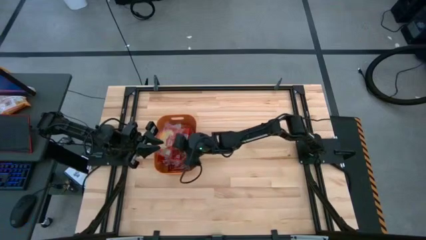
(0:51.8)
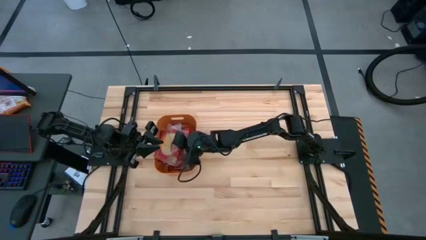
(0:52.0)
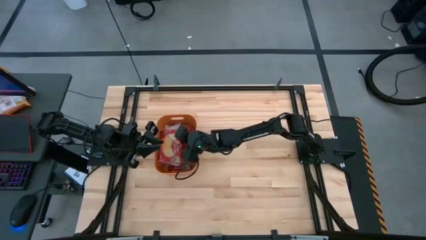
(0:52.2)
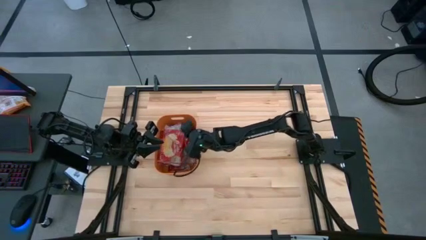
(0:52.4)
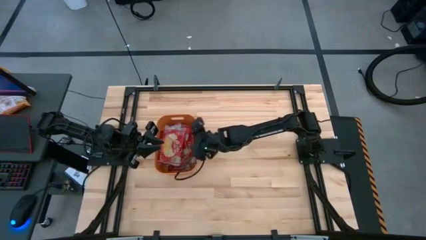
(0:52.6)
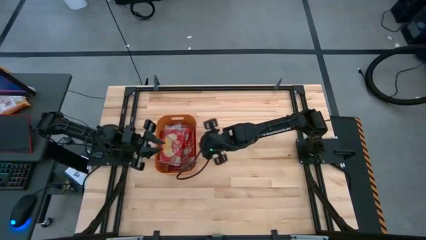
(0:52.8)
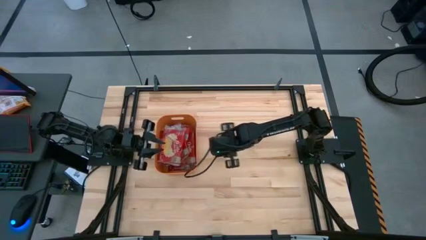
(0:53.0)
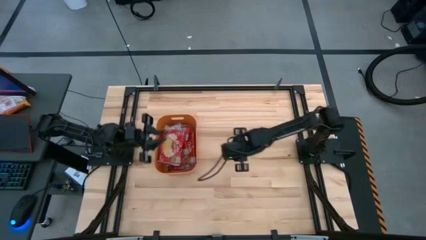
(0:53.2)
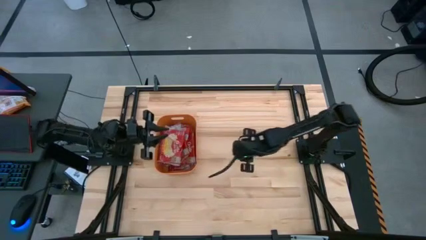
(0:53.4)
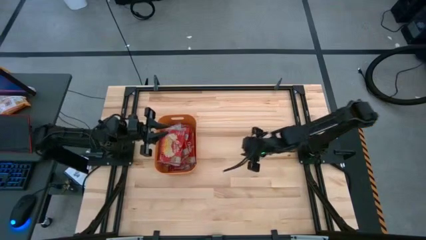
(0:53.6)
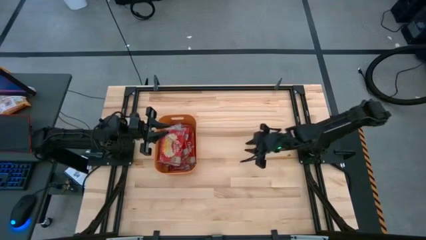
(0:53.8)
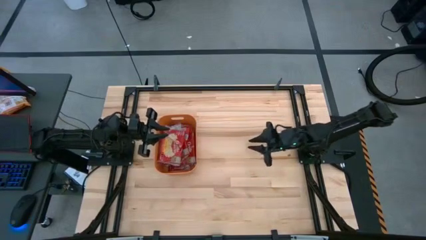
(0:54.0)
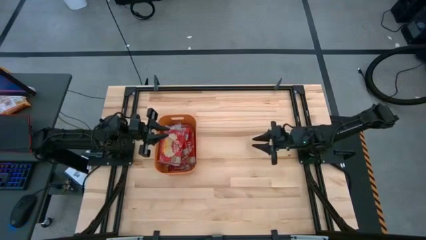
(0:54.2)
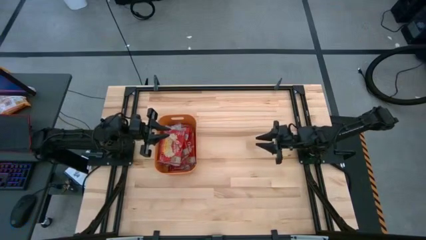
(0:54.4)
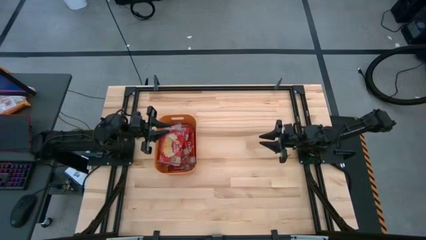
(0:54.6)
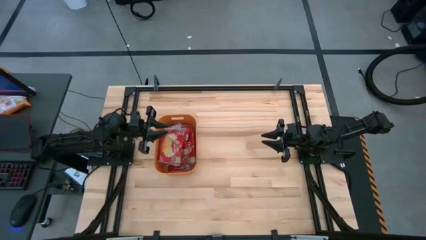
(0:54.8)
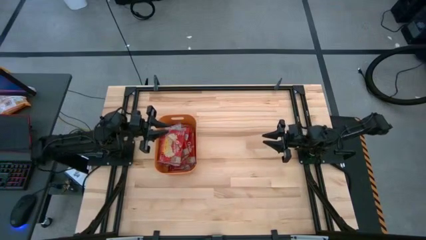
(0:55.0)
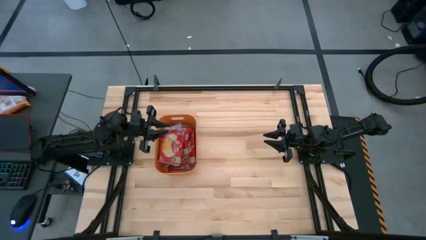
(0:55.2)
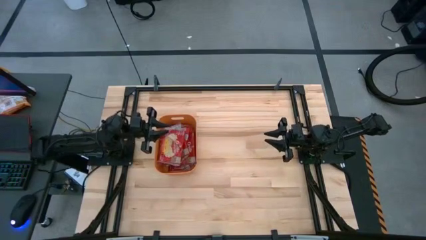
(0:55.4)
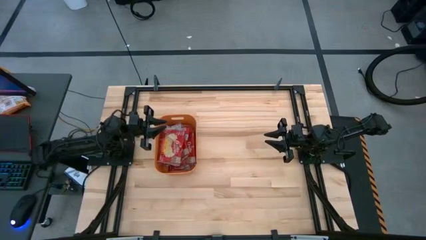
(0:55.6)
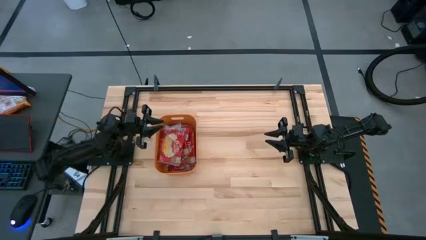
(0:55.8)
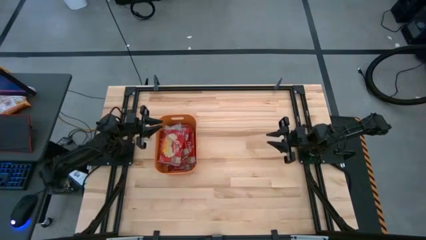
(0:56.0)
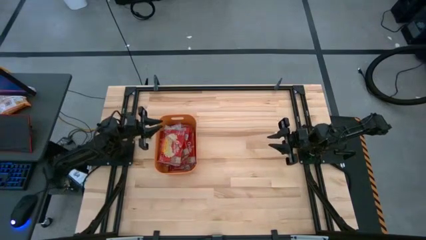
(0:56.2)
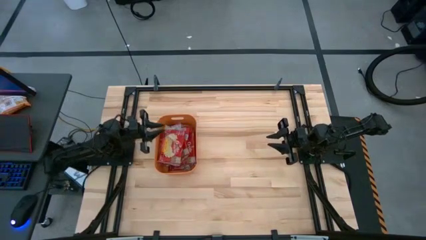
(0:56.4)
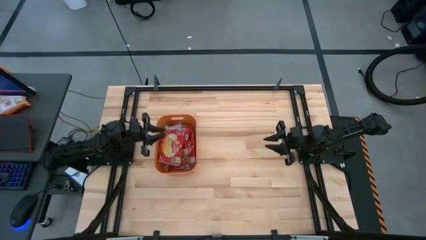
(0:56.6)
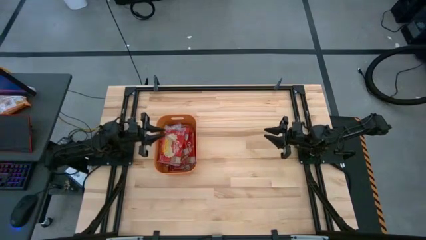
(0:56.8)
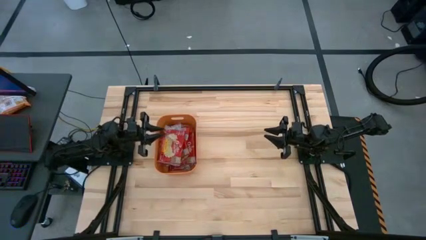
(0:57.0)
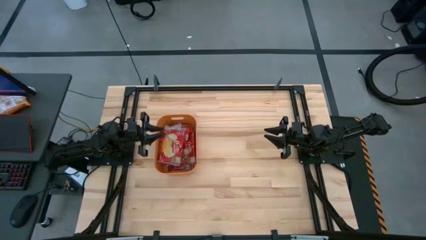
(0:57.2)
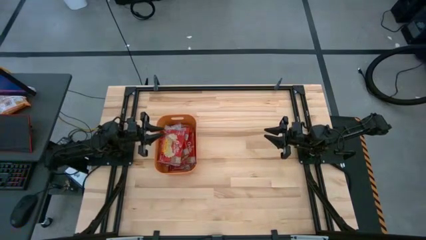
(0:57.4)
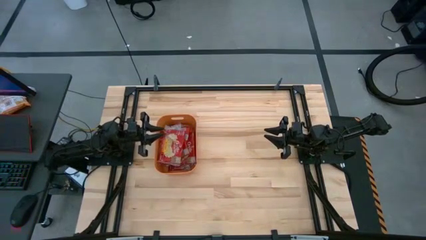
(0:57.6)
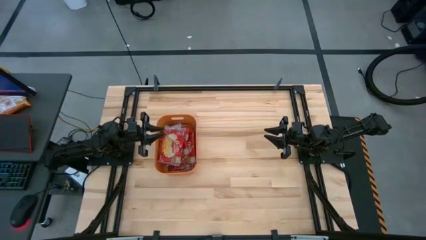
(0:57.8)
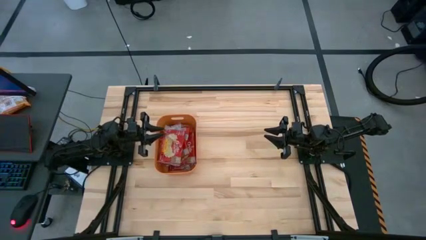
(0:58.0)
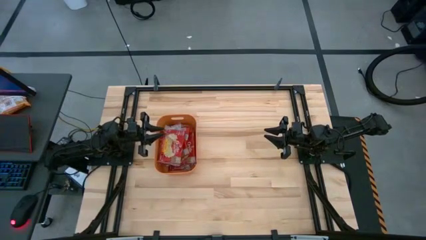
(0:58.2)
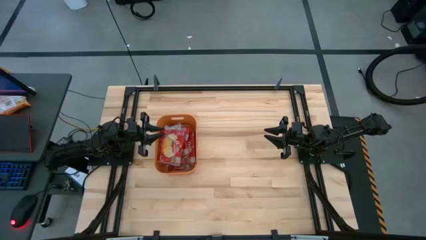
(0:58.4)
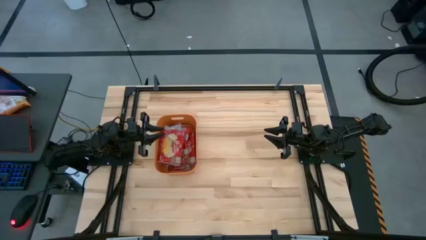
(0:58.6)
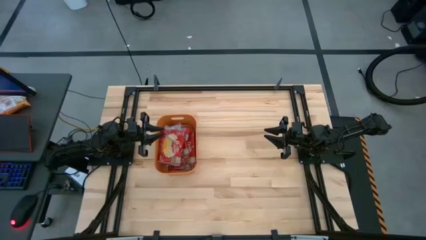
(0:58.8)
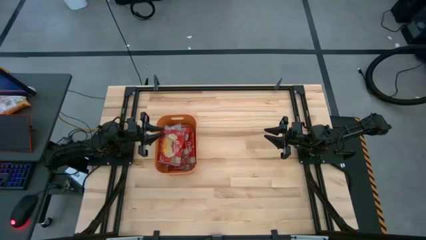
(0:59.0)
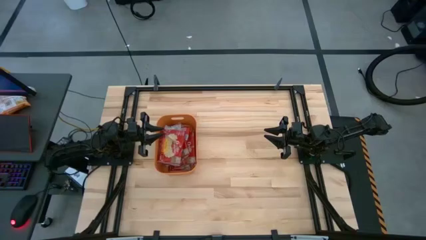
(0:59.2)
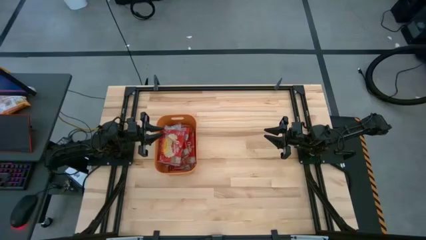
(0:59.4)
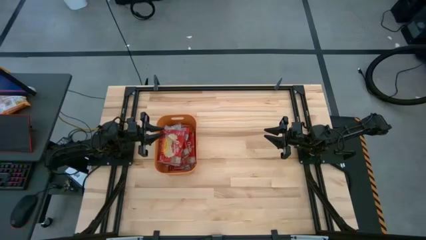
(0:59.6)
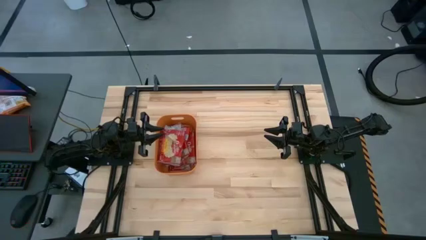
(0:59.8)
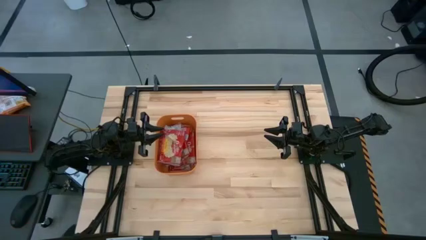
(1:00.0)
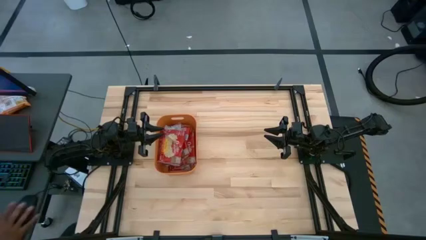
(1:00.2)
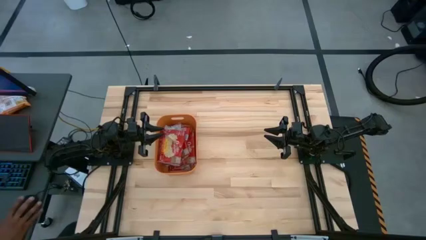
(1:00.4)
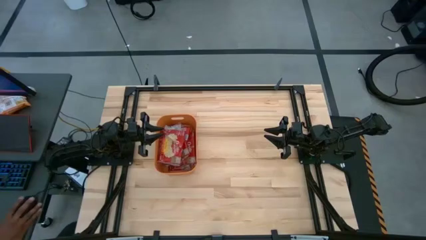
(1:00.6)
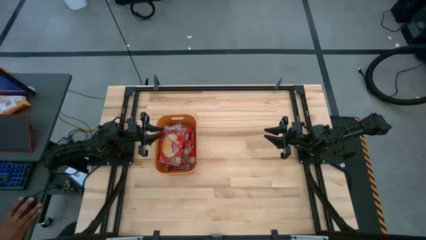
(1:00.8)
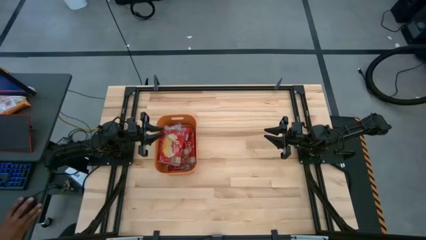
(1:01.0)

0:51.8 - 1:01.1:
Task: Sort popcorn bags into baskets
Return to Home Position

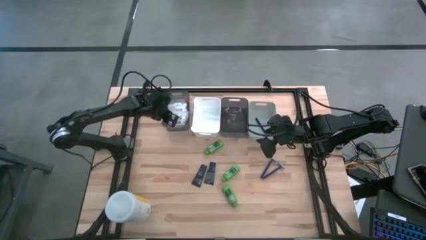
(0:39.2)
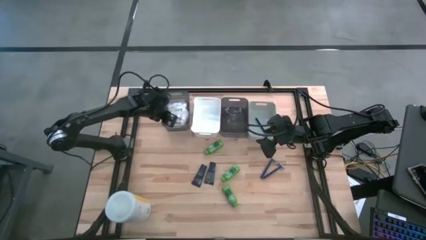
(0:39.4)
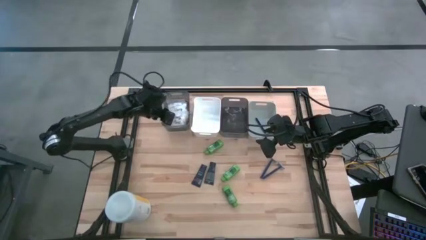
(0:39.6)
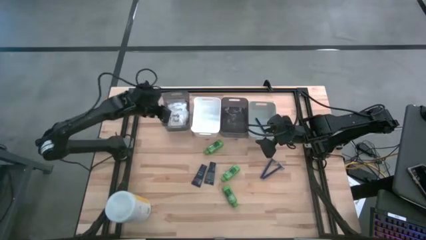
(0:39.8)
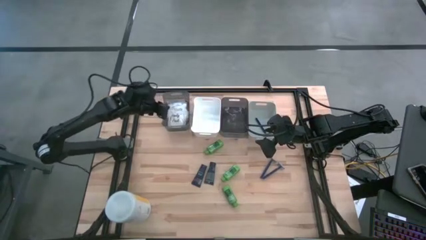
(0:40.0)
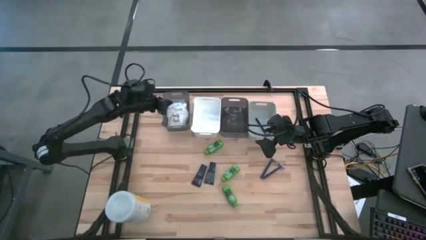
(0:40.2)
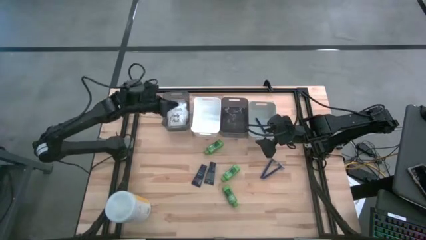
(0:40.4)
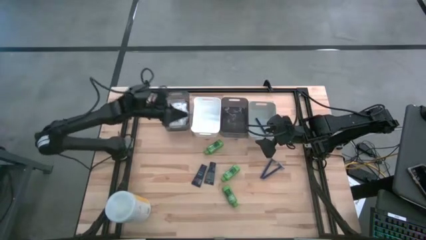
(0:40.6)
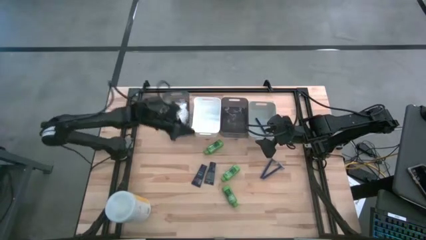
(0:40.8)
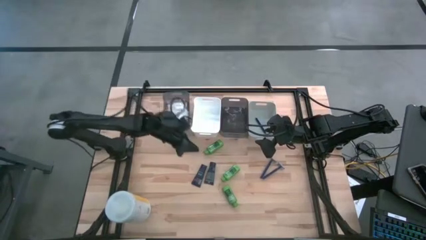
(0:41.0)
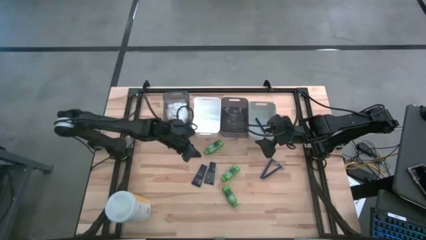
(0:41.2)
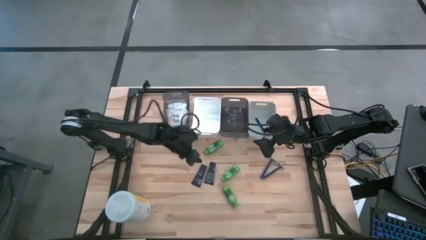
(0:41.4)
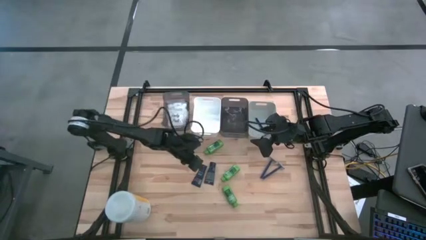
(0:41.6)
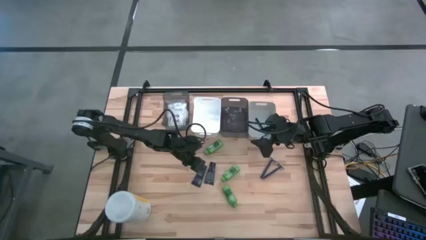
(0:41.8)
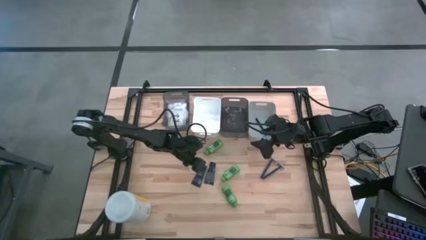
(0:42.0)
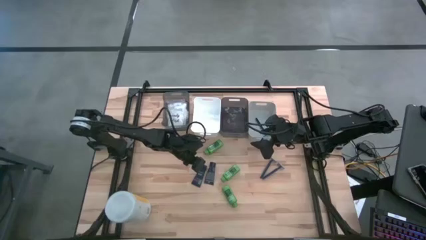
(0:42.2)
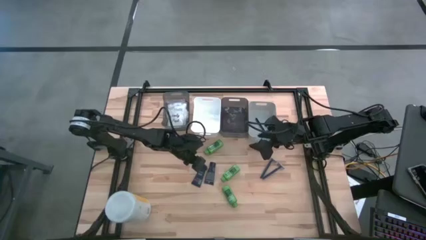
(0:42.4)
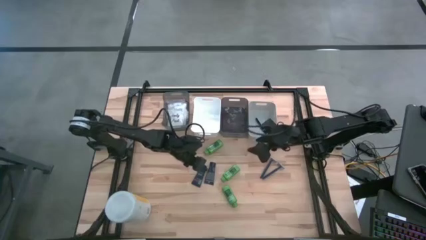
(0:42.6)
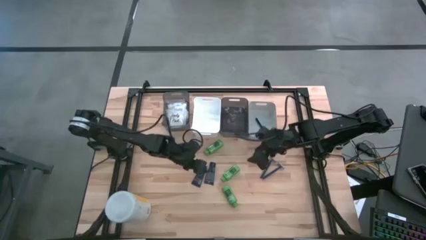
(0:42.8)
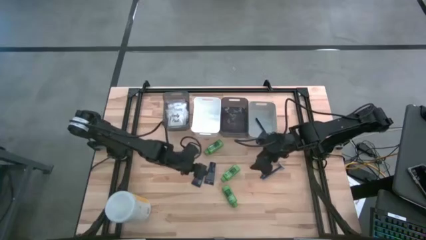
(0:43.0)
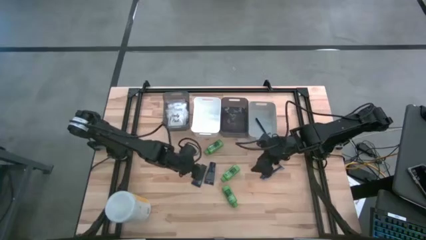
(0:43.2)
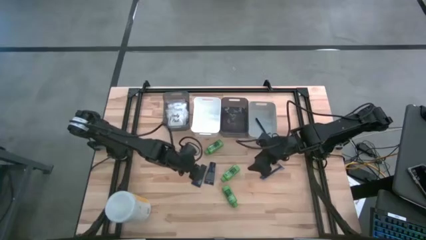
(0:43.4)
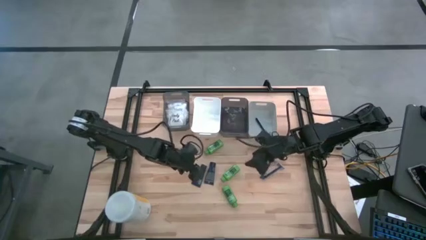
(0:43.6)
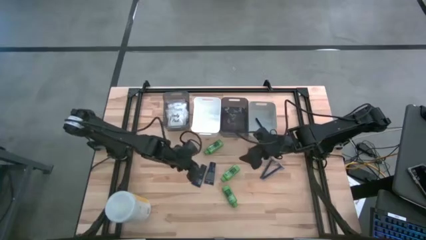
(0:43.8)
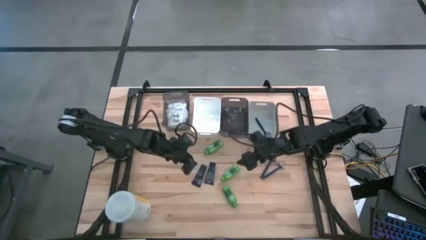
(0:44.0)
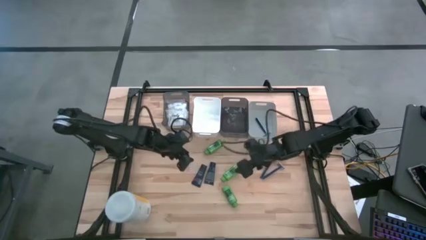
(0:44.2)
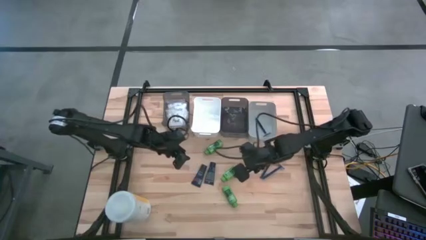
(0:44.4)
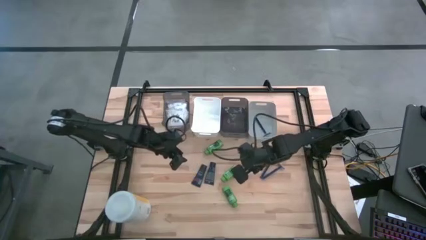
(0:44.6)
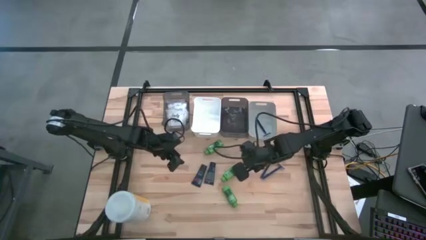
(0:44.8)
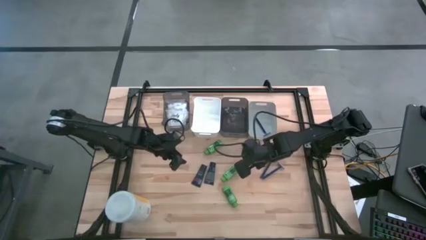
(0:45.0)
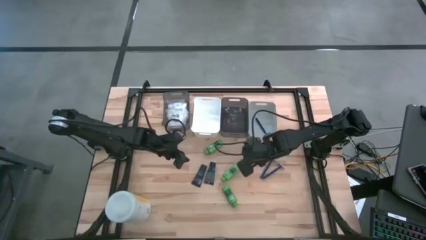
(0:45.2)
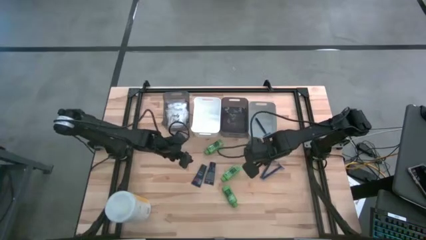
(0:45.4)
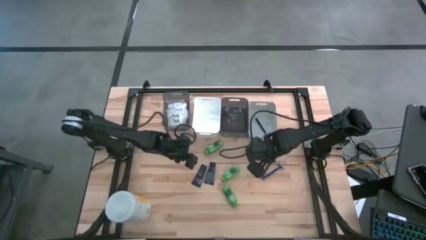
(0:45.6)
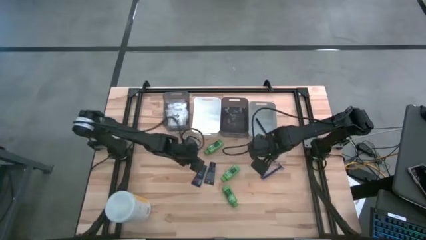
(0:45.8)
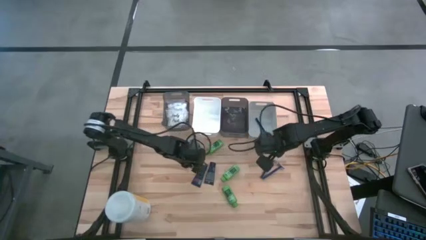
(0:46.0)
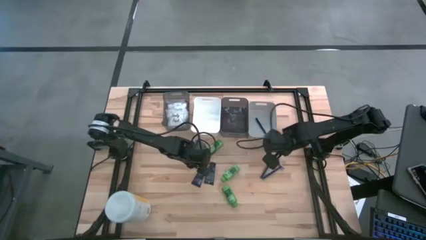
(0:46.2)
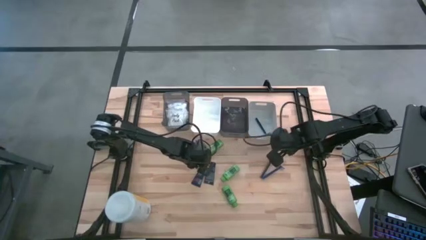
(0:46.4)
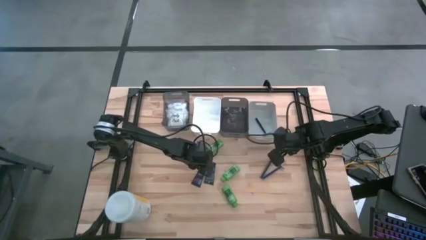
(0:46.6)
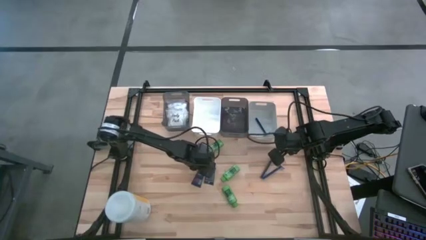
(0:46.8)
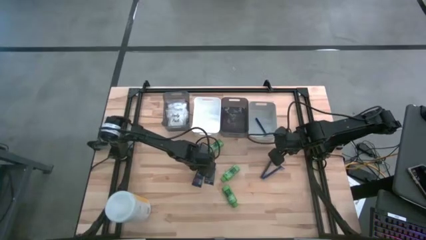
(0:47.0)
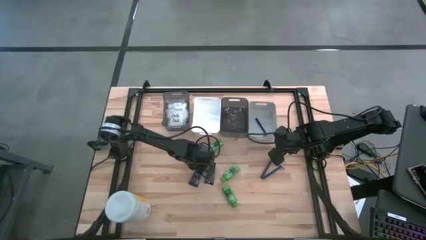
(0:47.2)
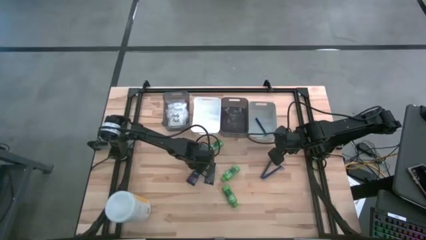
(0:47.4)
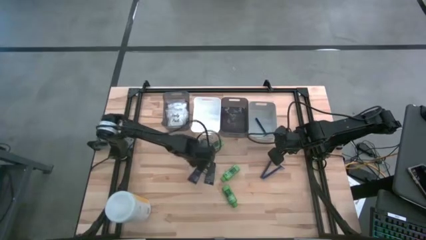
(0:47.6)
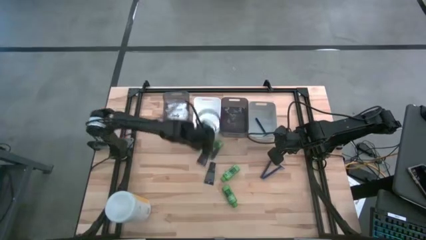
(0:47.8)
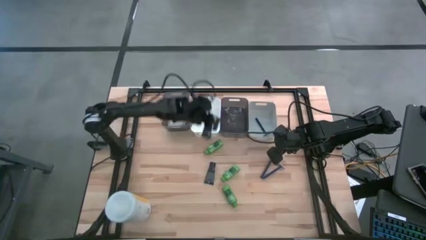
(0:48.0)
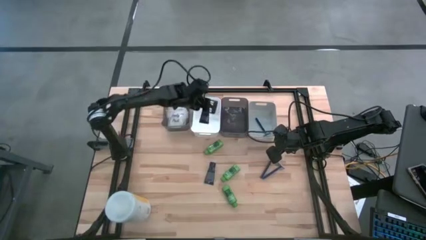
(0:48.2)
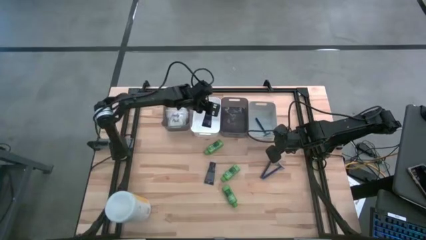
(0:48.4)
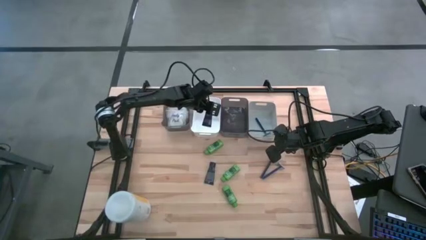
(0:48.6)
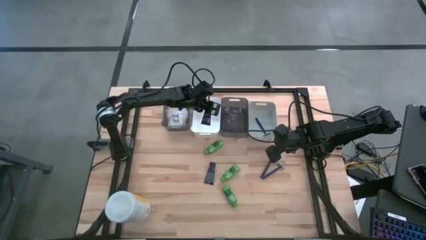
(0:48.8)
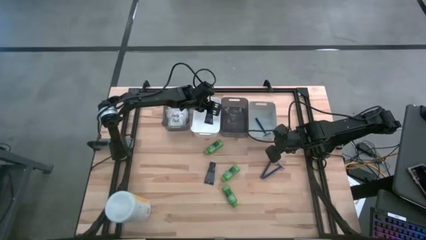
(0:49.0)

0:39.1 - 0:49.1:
Task: Pick & Place Travel size toiletries
Put the left shave cream into the white bin
